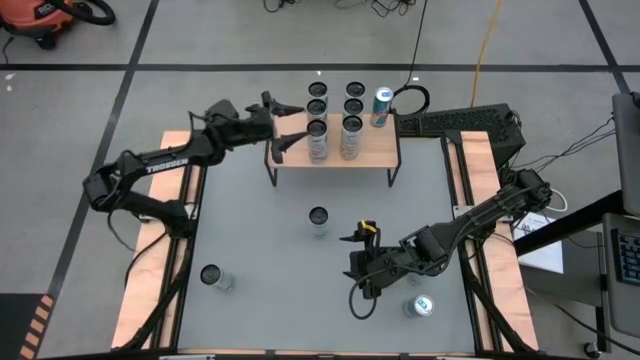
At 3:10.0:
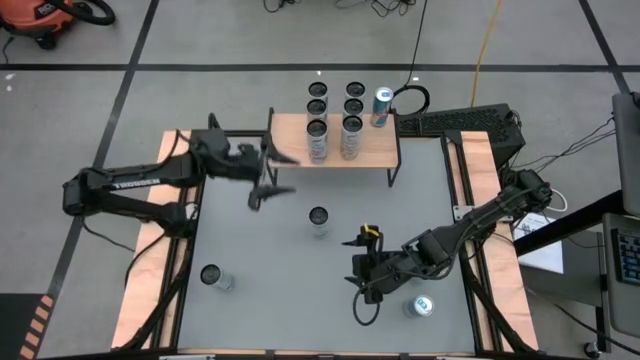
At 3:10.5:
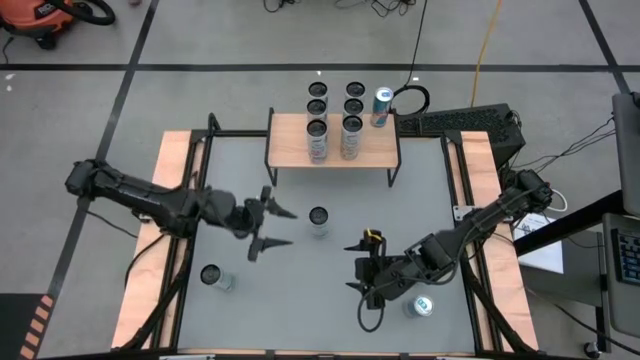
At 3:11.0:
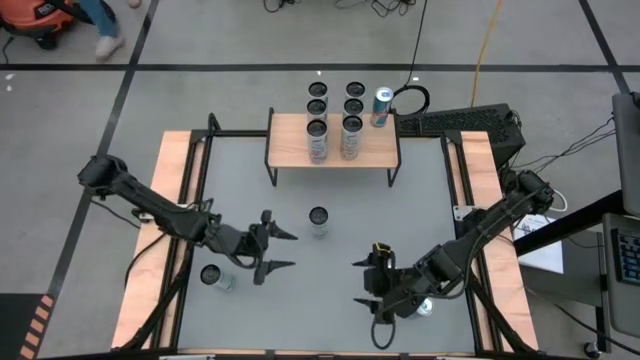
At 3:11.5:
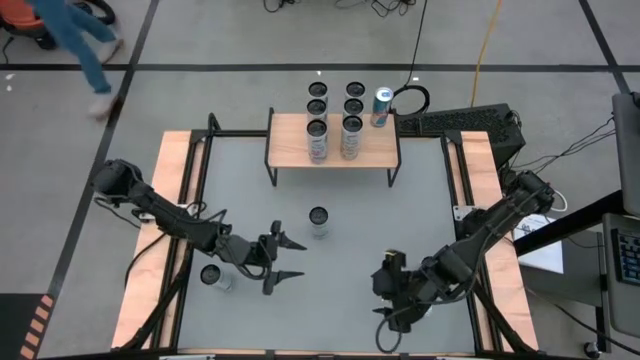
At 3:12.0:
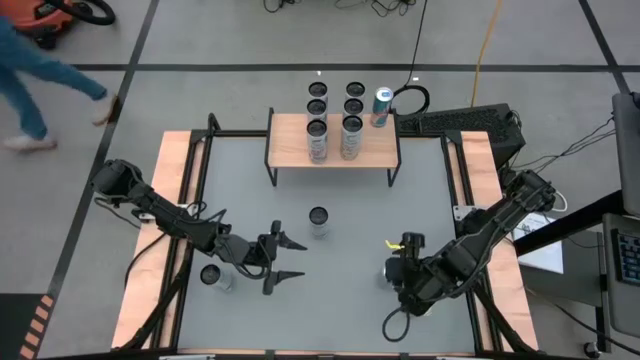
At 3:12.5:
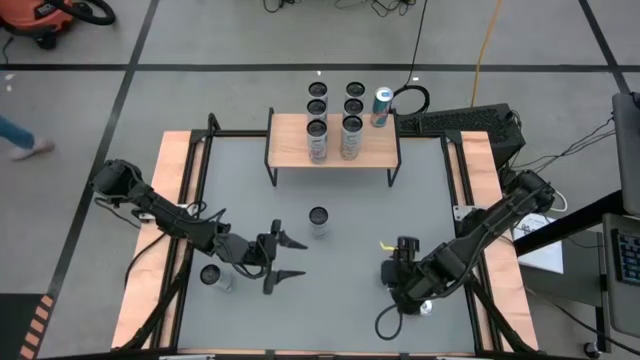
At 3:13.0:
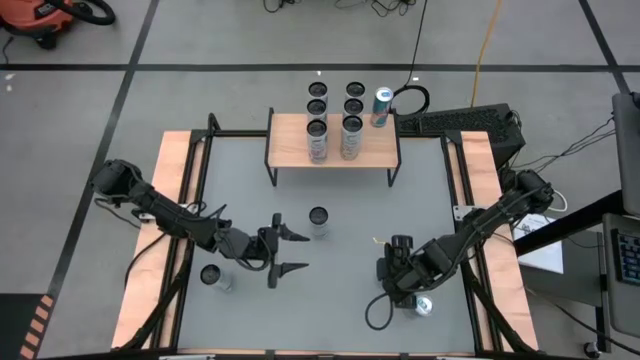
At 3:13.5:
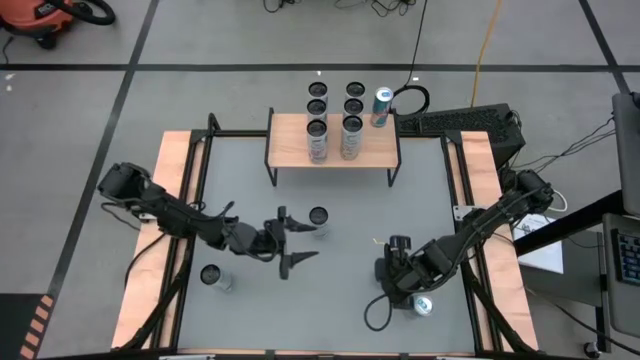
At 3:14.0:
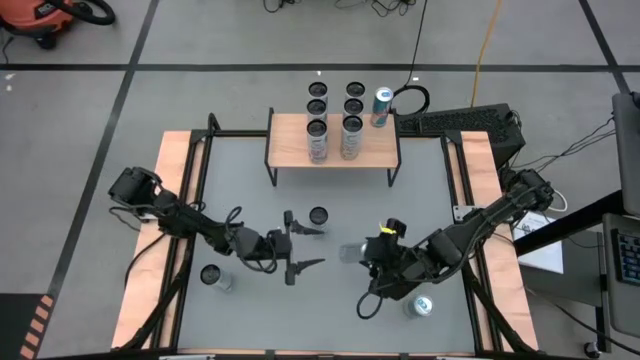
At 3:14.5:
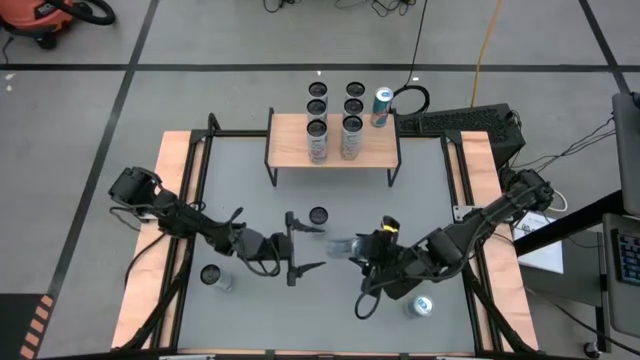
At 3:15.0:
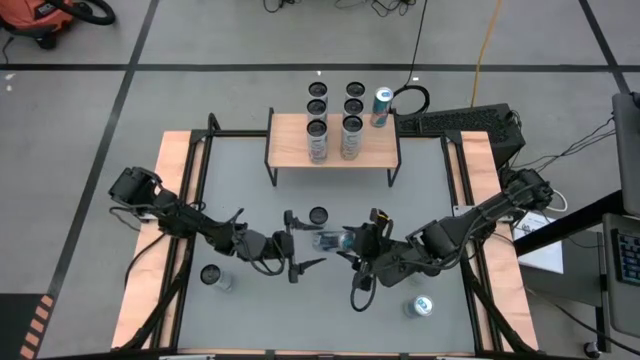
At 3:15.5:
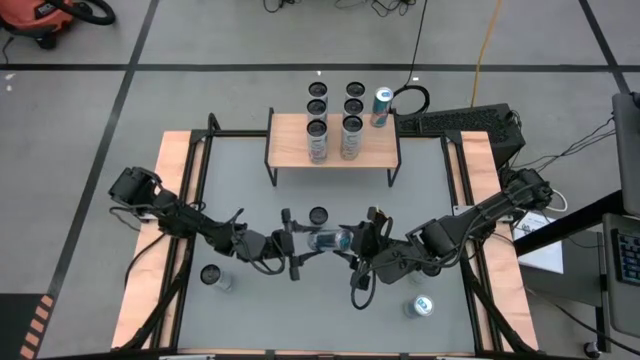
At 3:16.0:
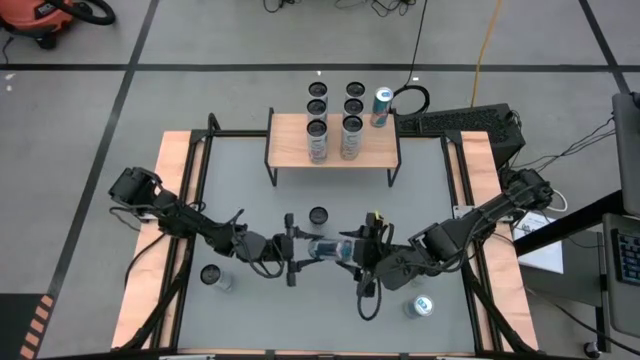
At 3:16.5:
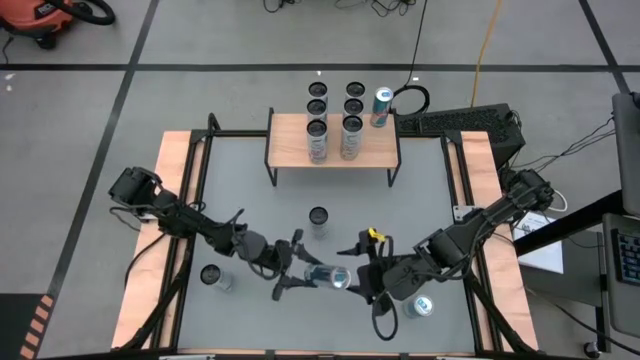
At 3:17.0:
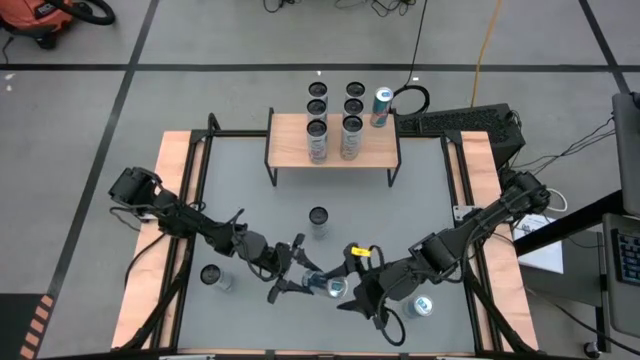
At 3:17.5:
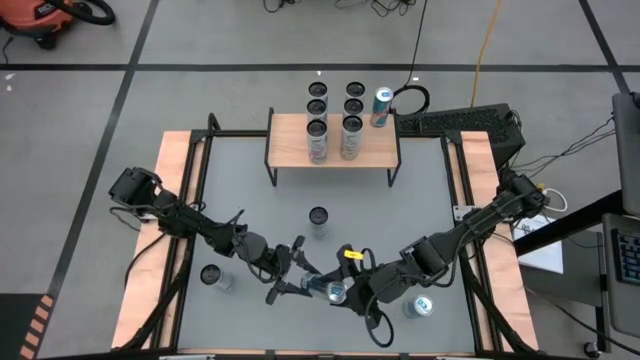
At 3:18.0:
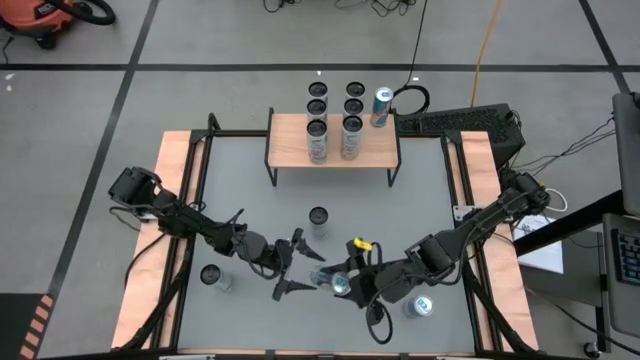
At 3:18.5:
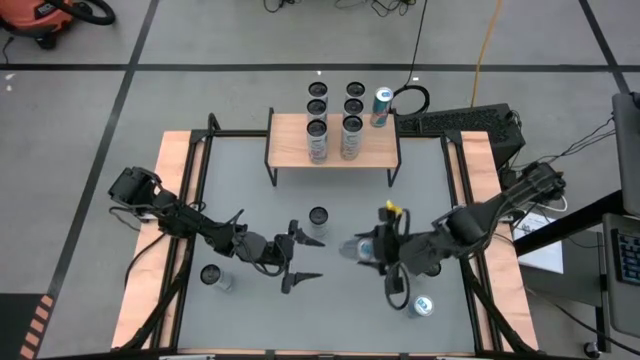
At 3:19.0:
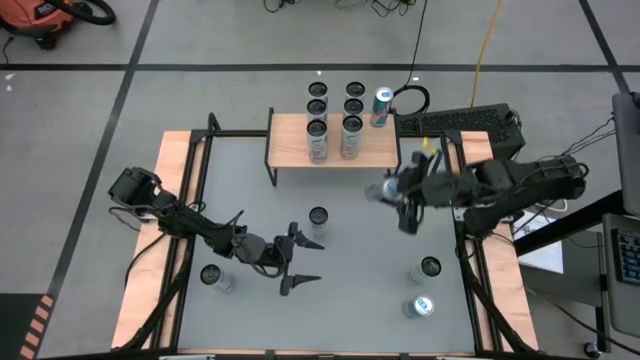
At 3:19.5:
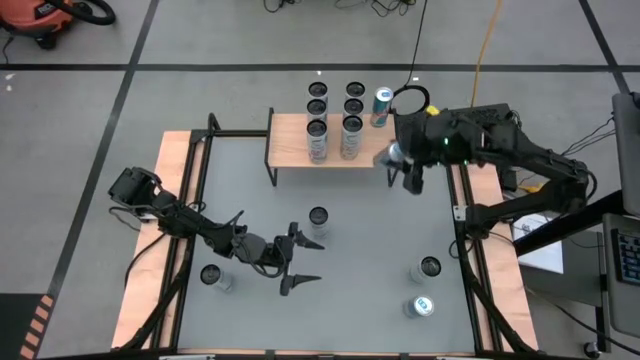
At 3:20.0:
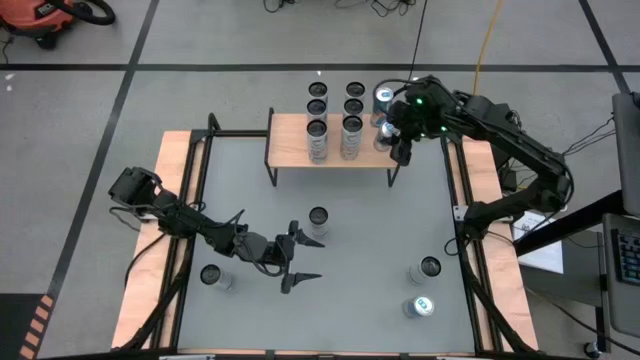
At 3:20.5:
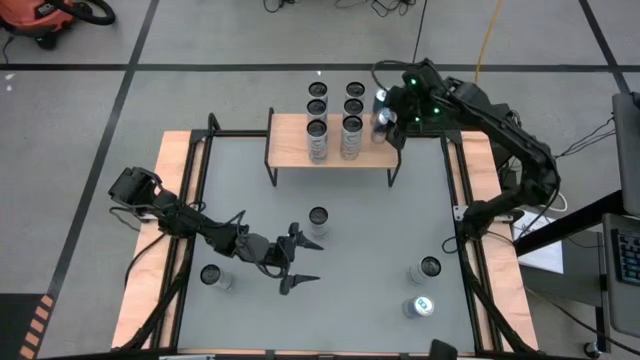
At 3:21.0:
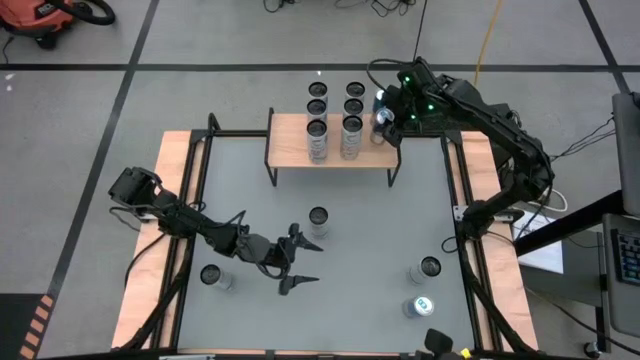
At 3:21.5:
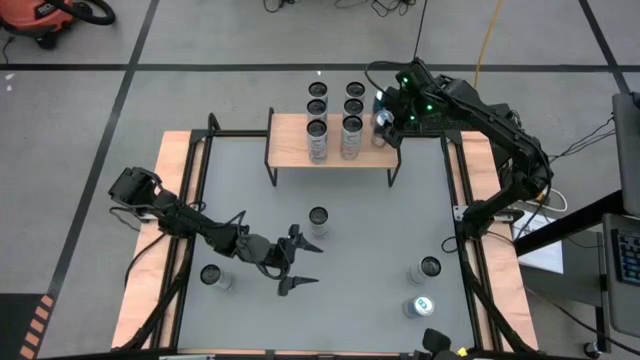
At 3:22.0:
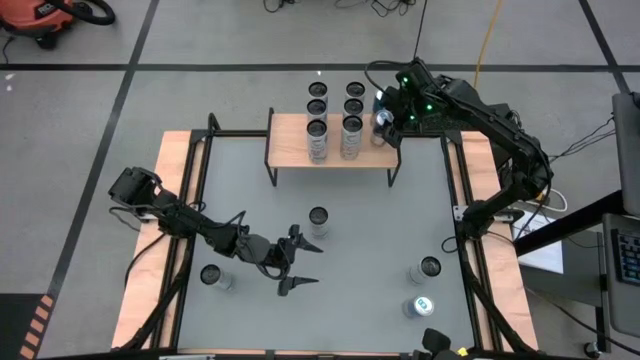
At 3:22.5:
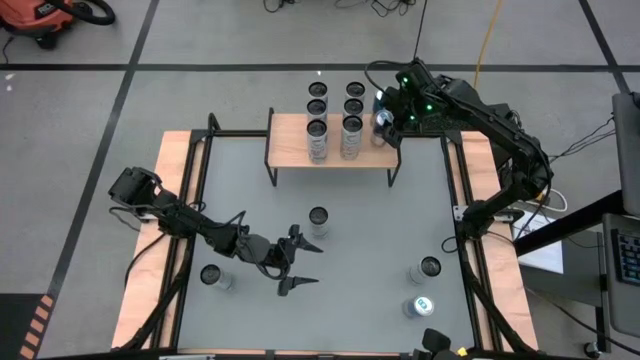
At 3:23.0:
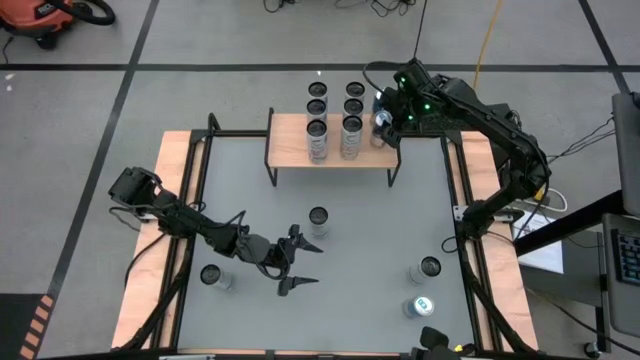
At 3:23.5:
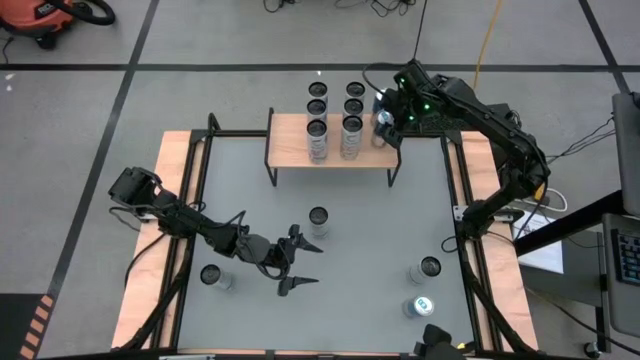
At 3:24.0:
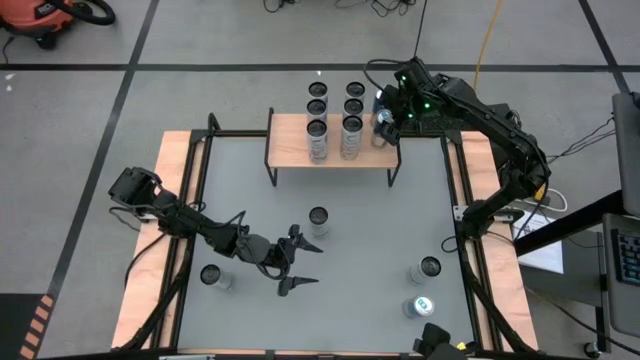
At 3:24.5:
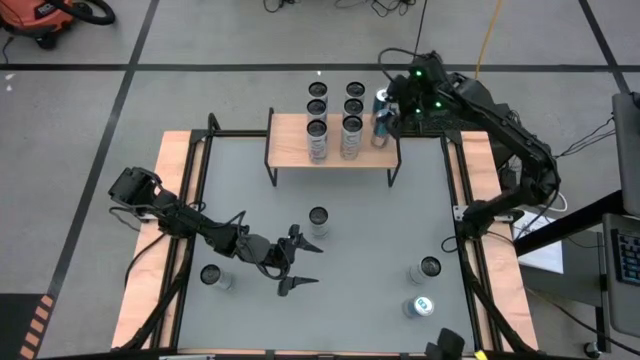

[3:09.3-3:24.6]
Task: Place canned beverage on shelf
Put the top blue soda can on the shelf aligned with the other blue soda can

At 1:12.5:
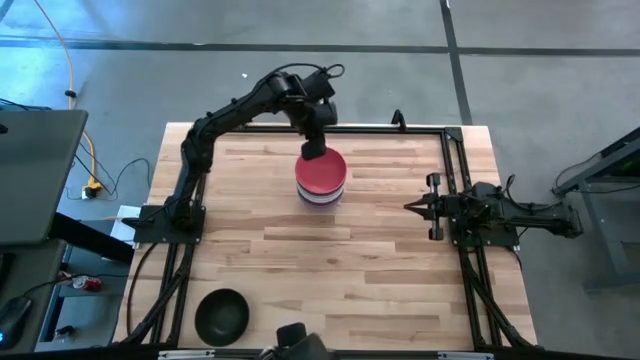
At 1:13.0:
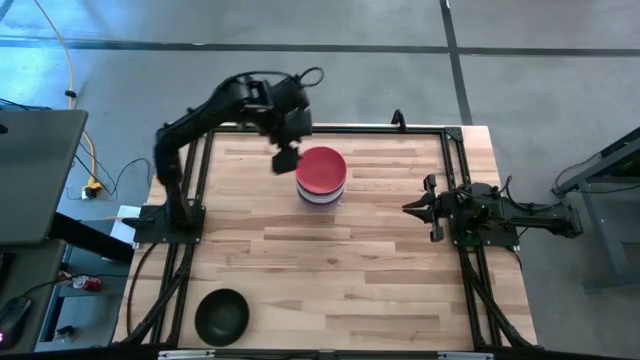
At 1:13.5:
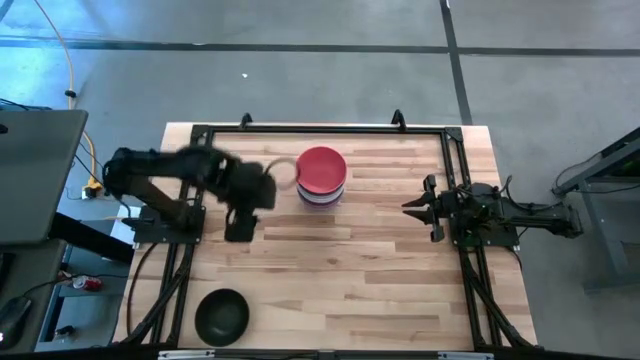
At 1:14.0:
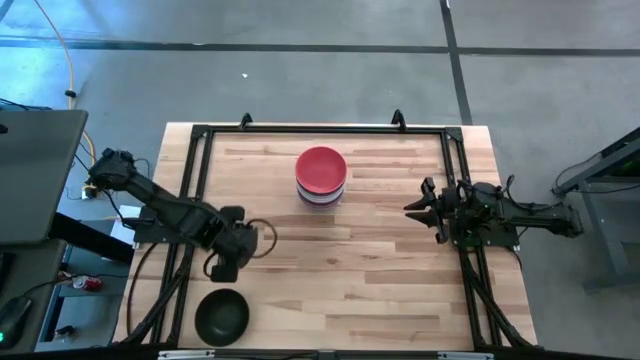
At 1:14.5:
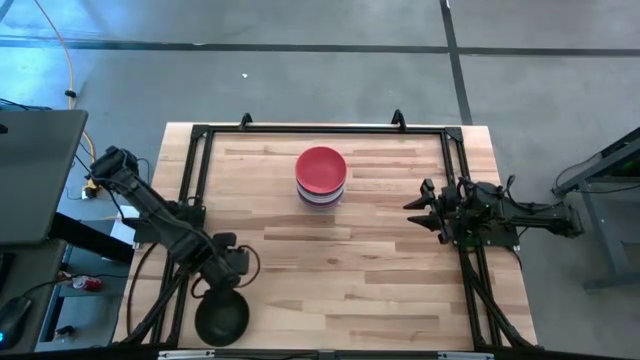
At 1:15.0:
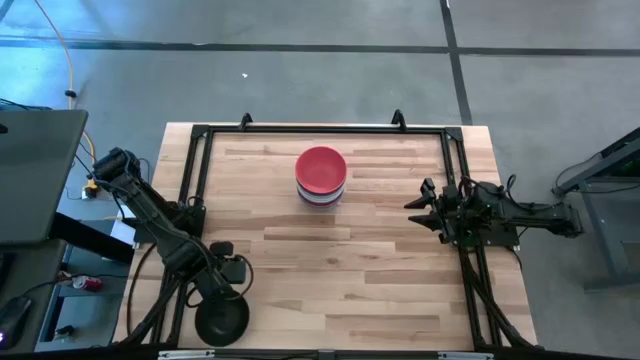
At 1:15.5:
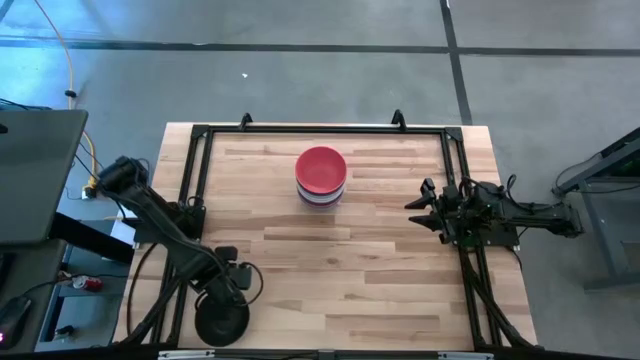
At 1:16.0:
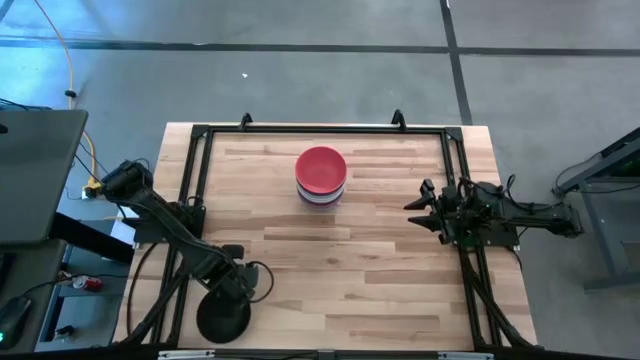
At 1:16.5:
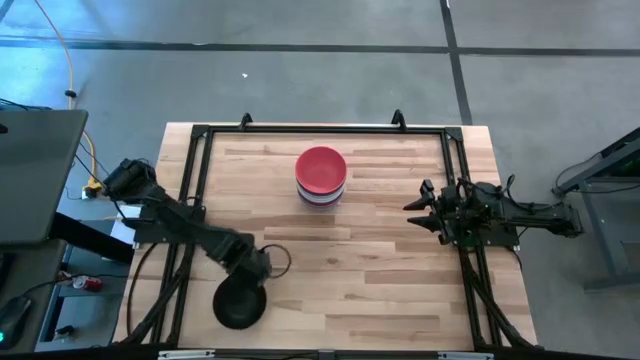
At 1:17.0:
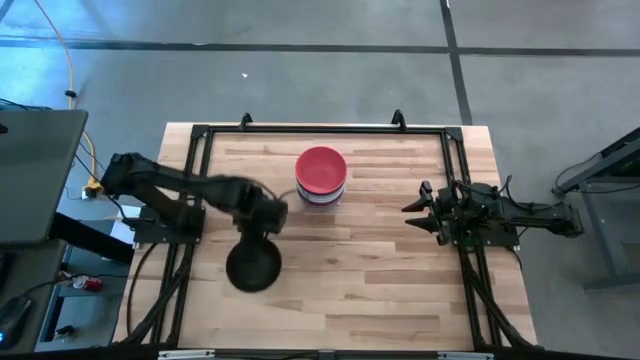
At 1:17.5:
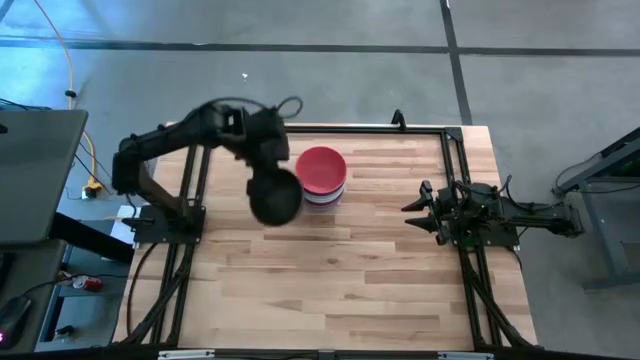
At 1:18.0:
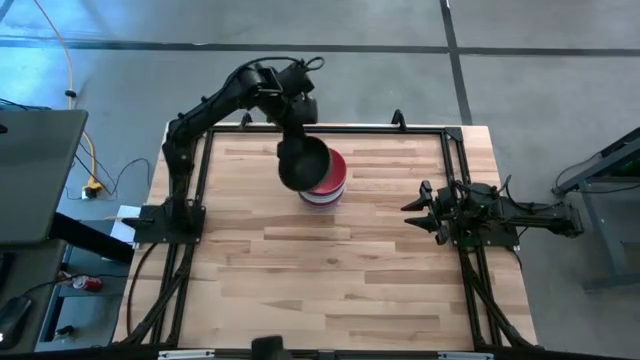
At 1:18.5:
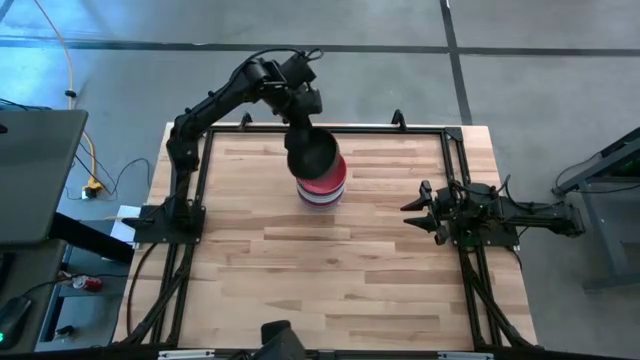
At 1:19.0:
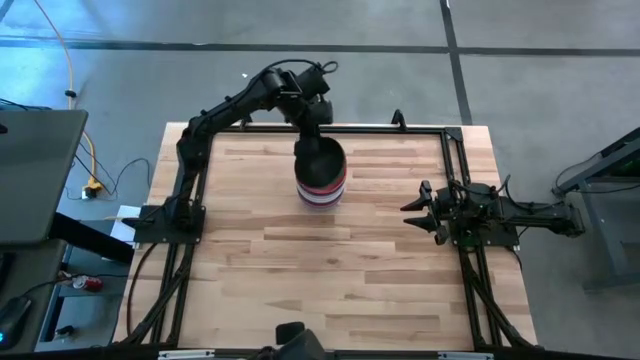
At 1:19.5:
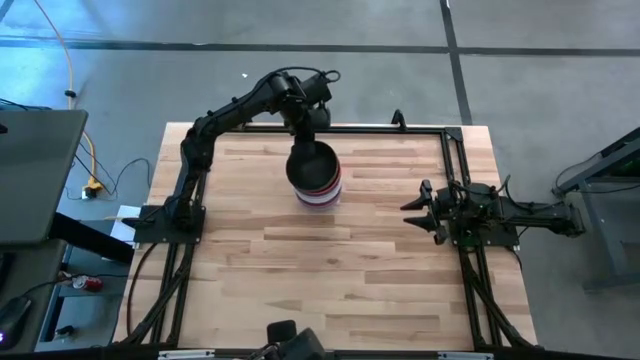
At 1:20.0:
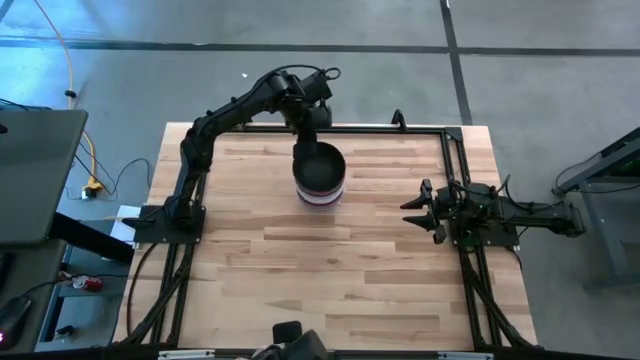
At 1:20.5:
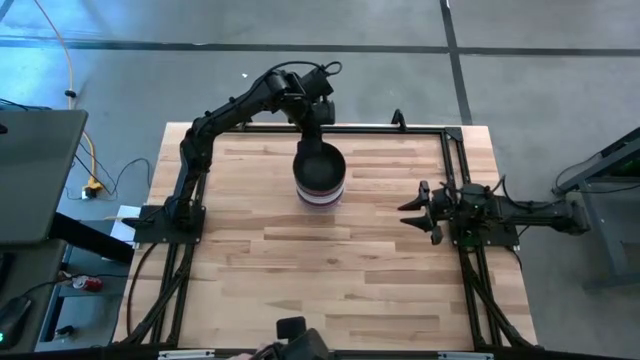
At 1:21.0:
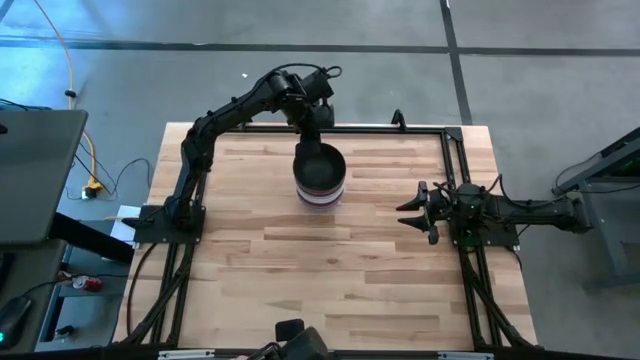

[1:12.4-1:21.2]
Task: Nest bowls inside each other
Stack the black bowl on top of the orange bowl
